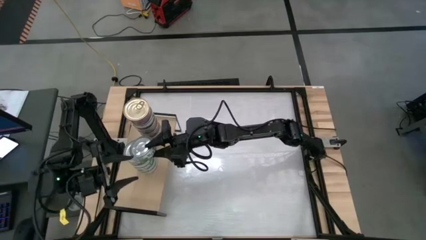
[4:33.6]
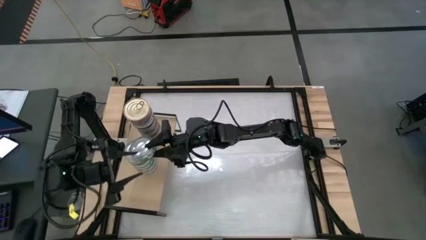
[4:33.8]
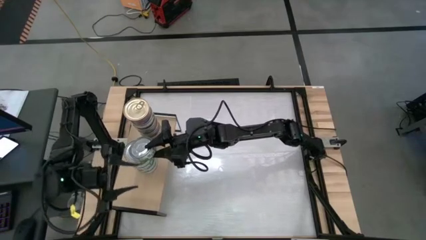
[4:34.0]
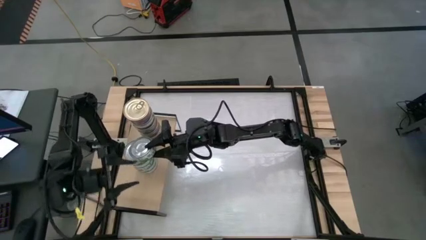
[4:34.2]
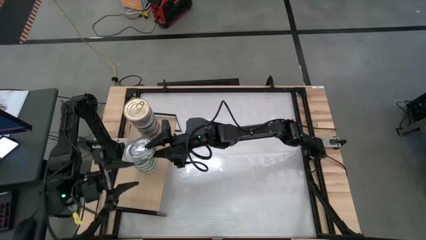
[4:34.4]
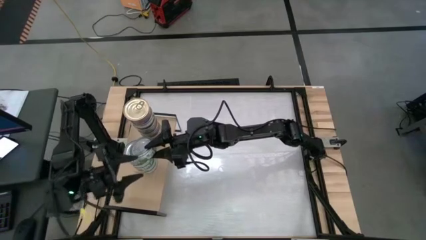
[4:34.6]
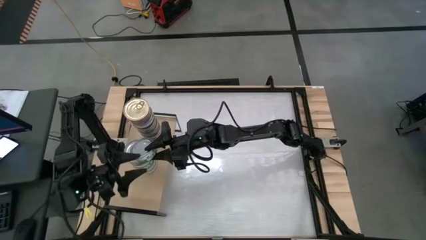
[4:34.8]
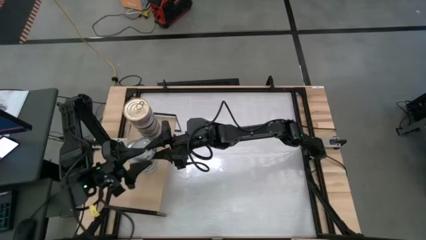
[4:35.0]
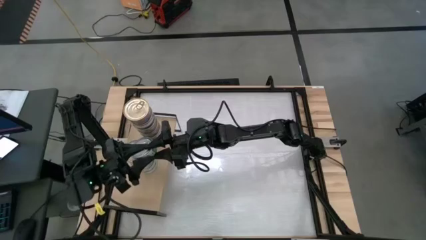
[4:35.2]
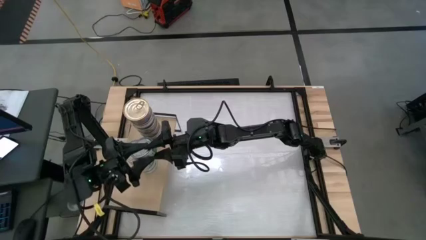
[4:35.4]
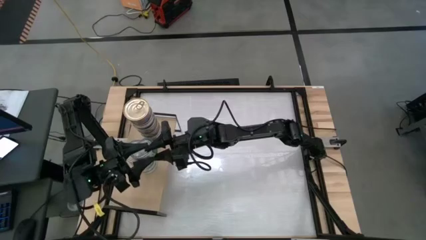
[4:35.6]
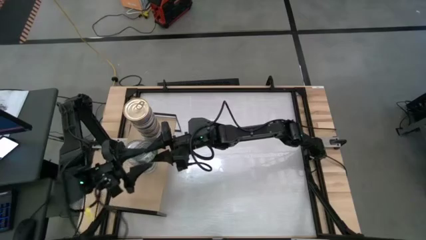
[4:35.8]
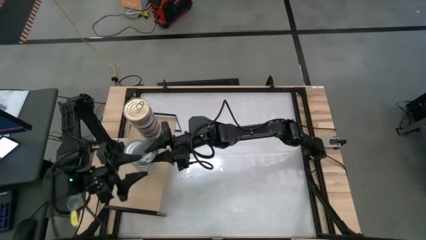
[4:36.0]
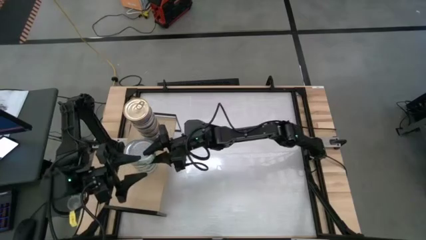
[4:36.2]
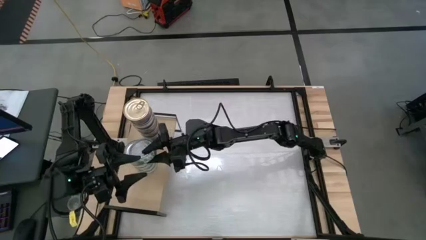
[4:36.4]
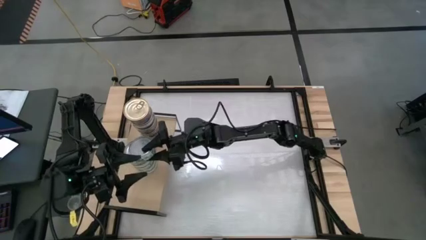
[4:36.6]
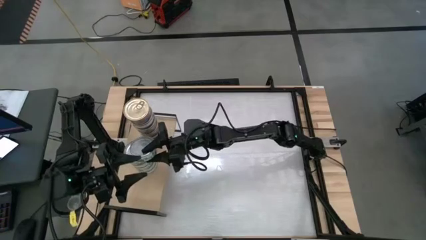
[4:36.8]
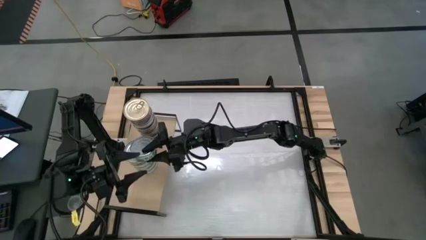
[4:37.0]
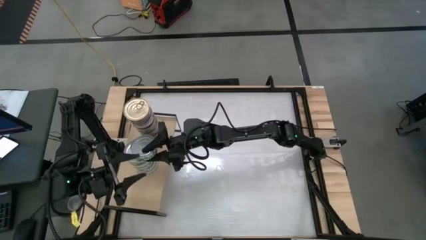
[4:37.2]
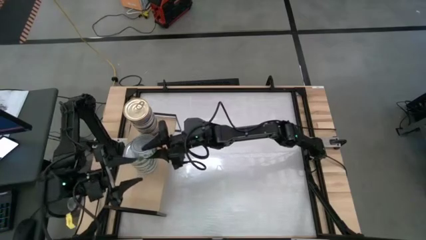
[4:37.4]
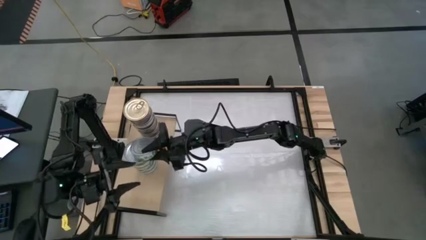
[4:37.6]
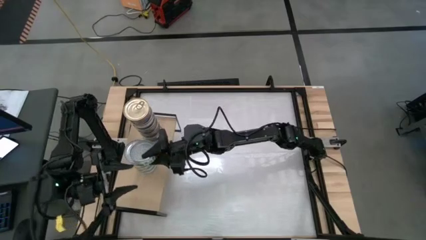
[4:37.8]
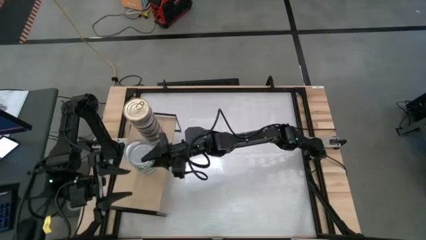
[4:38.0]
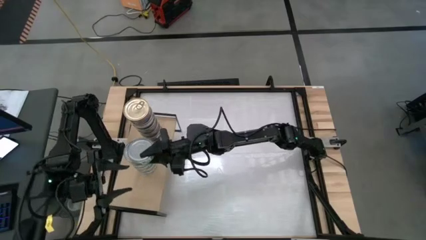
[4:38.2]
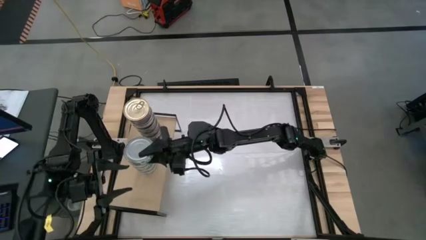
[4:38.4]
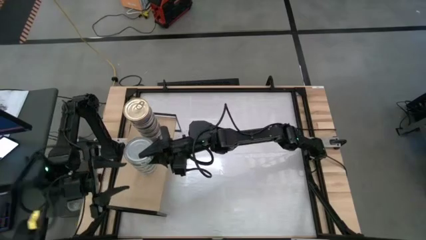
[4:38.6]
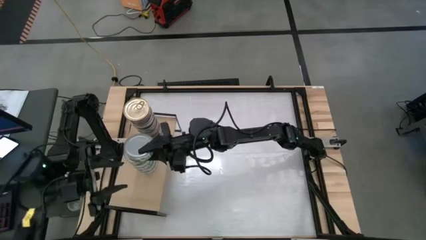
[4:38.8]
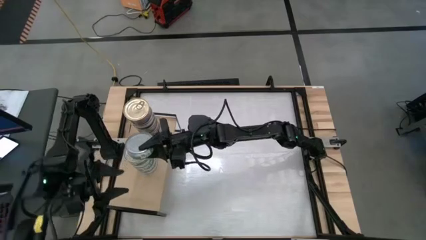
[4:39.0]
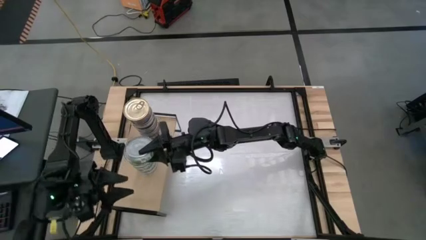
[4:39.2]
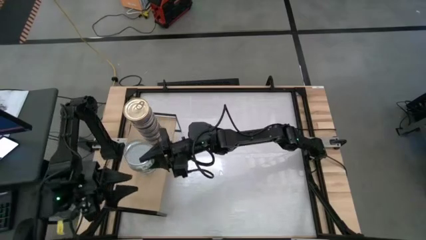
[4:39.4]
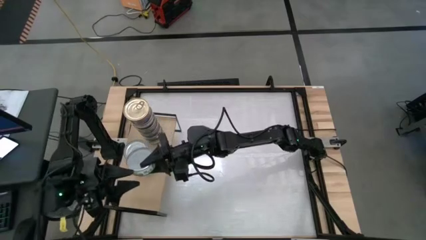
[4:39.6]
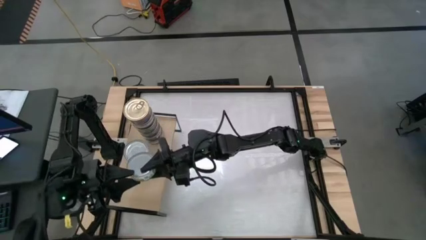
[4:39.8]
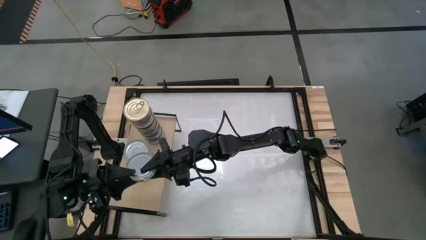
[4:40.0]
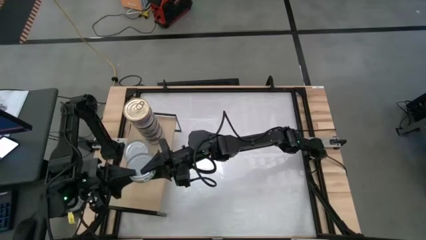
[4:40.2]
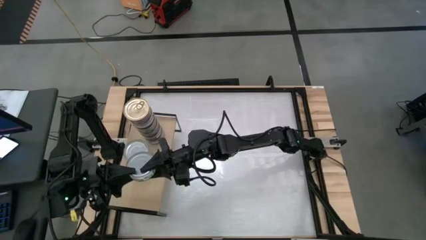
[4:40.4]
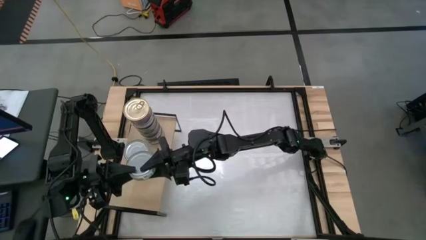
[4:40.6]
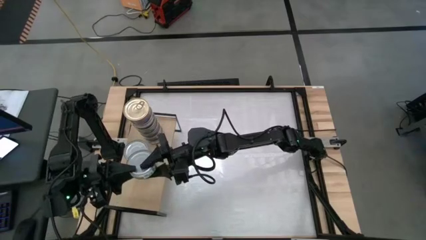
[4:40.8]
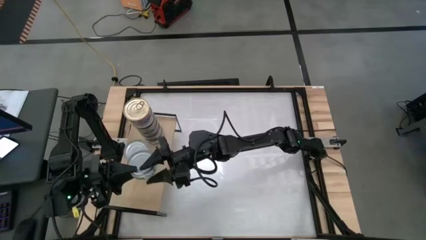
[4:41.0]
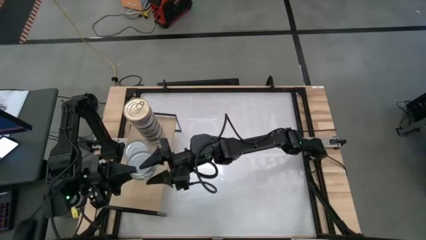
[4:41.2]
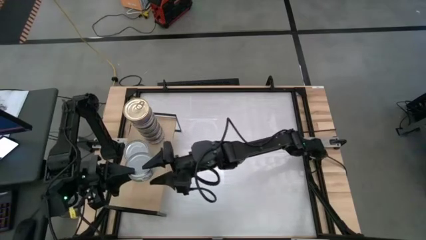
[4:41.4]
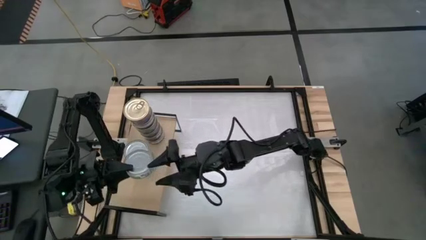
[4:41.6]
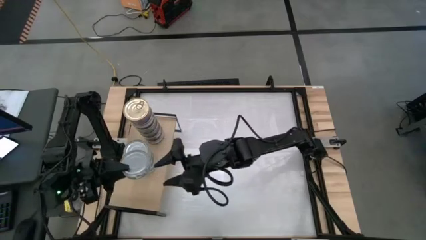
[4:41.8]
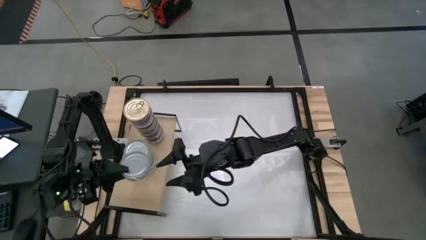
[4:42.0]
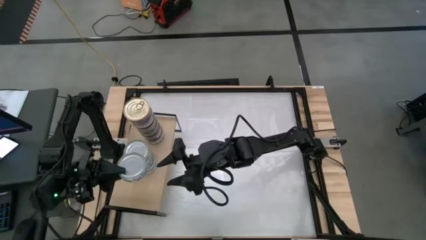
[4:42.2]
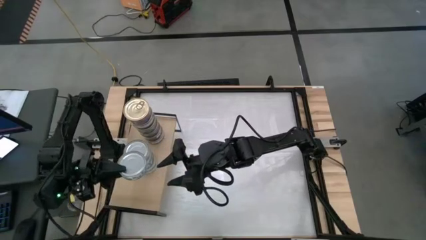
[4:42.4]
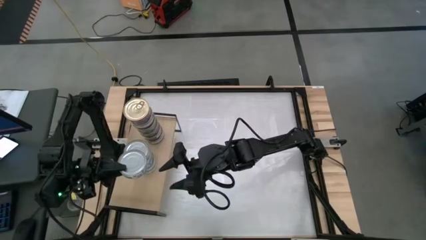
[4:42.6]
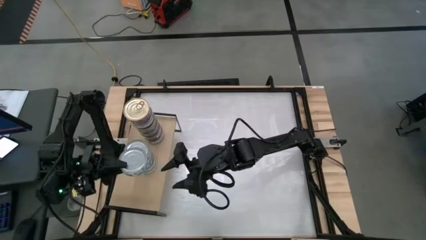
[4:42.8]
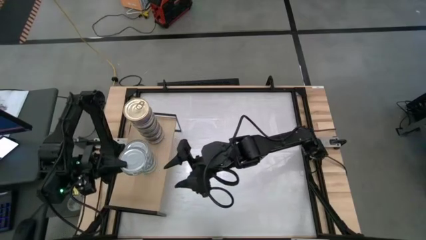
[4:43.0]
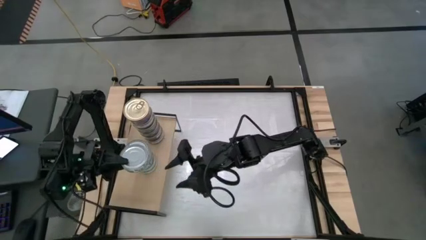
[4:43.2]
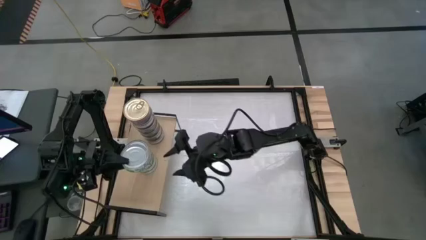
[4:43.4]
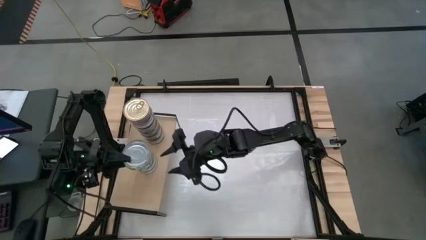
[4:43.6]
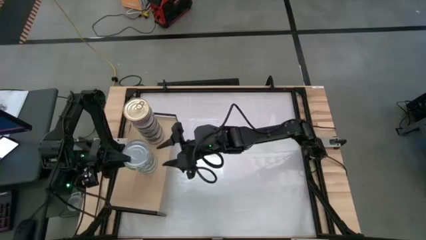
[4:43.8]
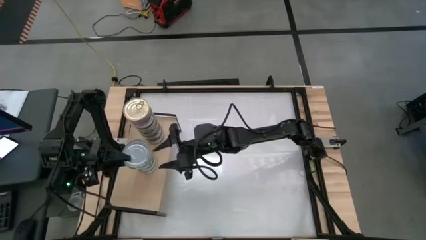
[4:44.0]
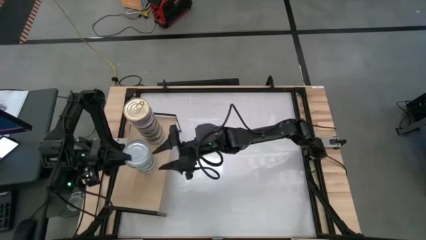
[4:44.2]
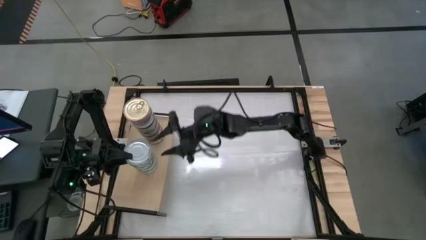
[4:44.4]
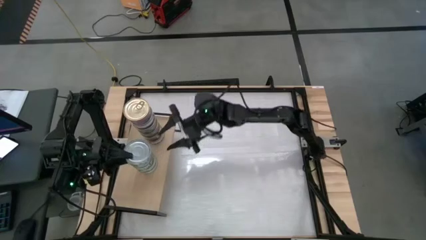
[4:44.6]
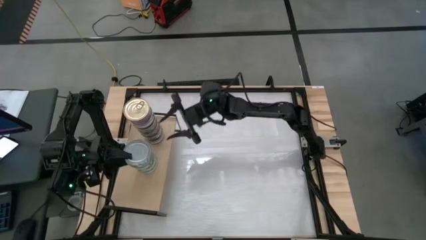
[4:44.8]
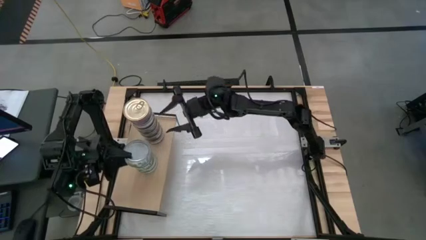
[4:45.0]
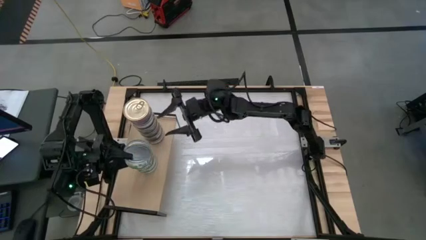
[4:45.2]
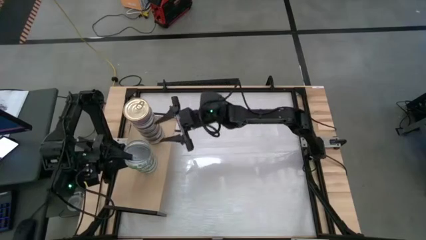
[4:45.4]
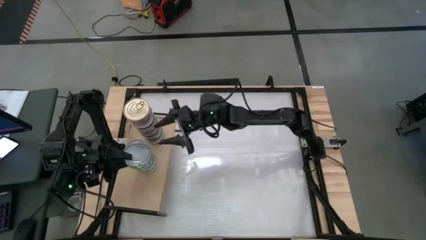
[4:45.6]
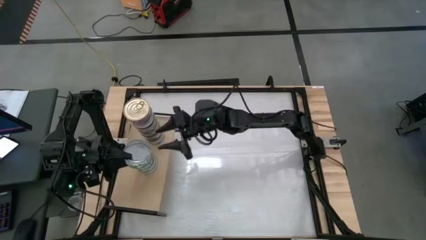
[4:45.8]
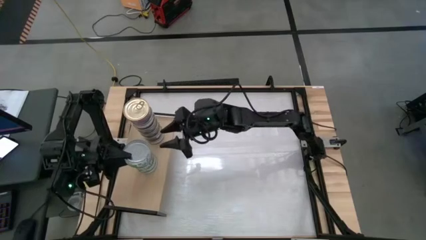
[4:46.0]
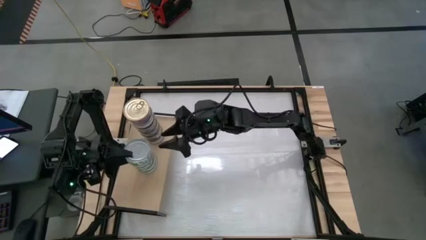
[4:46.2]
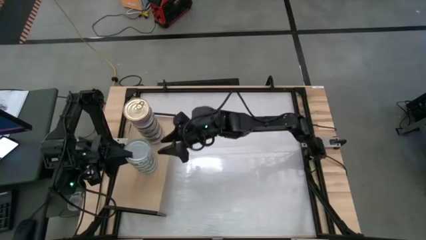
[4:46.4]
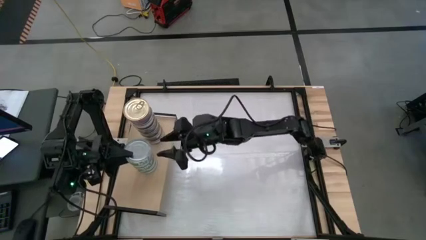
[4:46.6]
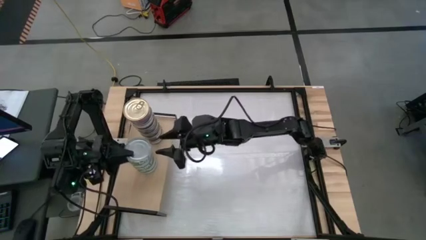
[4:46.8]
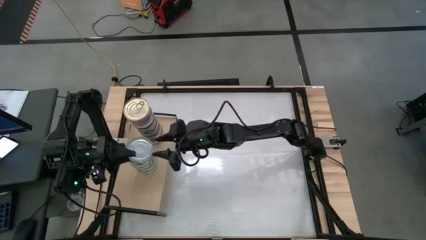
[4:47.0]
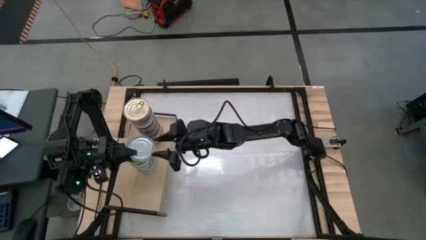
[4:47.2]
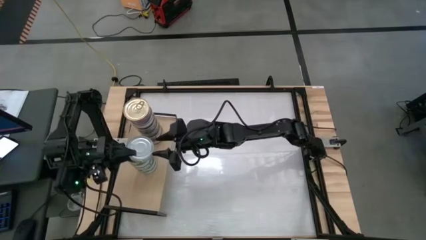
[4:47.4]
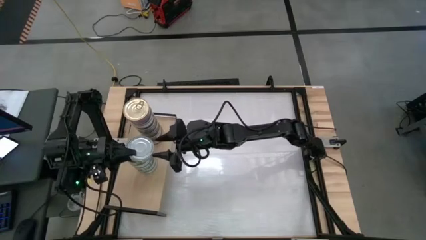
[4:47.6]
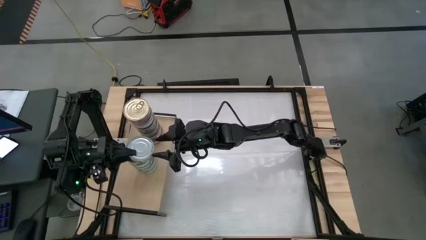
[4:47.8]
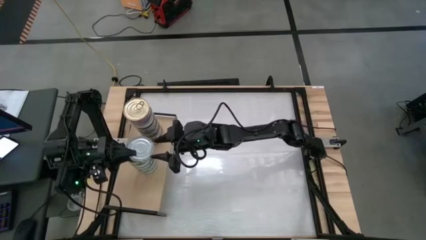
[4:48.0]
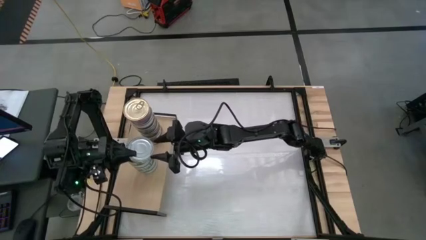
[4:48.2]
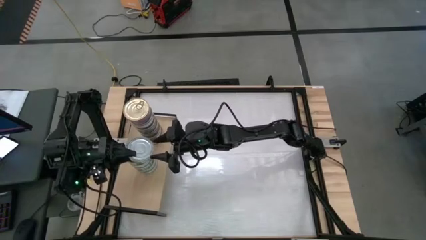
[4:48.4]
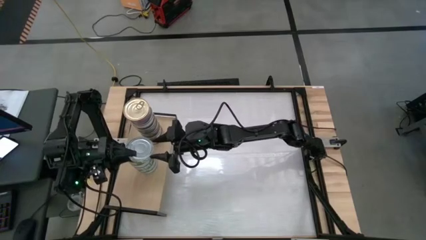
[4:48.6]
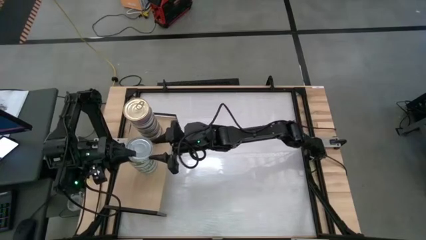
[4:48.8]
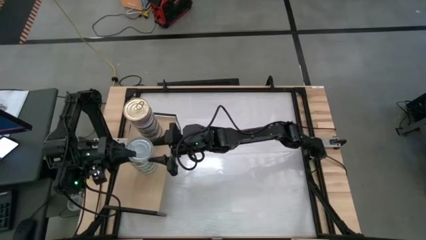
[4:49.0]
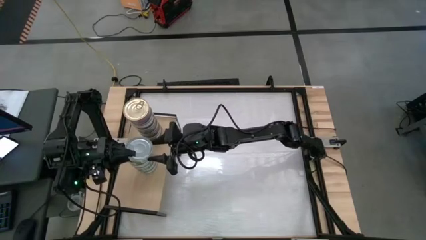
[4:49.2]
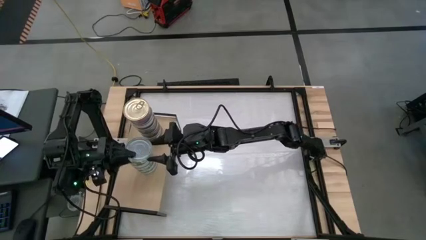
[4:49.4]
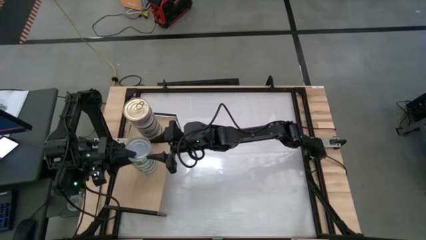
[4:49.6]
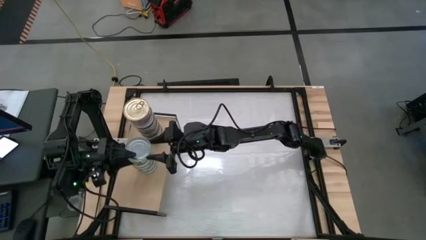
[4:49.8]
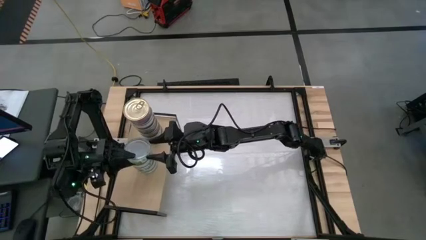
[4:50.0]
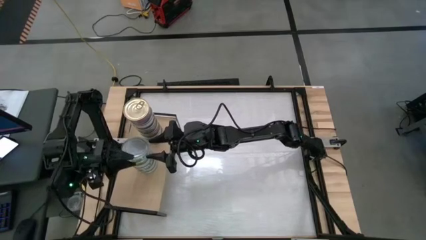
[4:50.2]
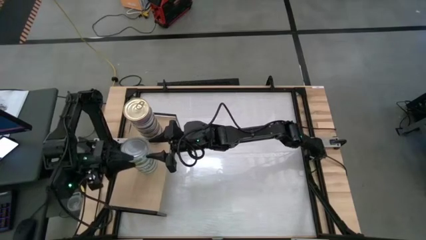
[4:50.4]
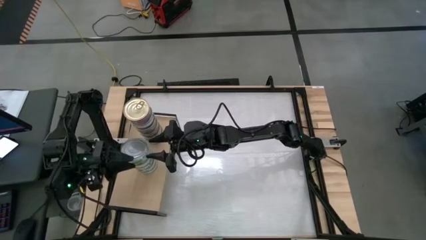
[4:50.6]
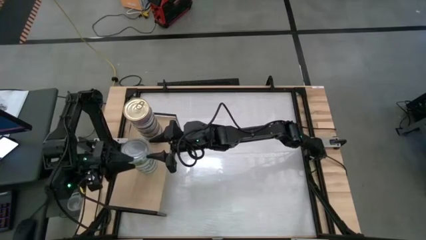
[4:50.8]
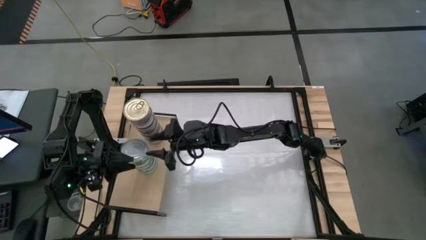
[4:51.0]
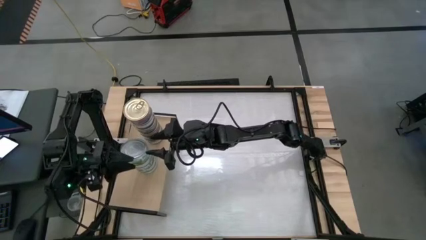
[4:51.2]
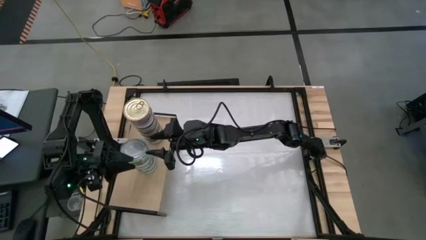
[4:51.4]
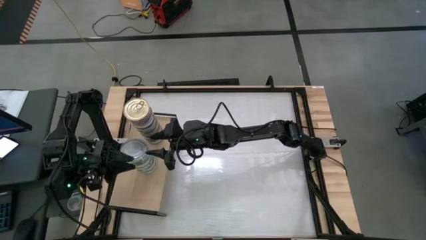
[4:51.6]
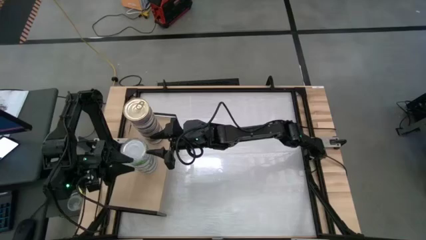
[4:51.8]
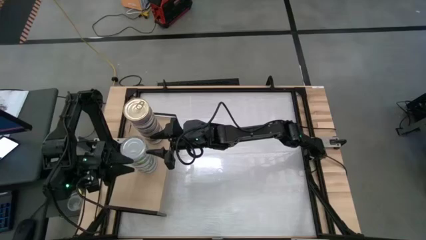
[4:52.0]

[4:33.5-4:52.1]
Task: Stack canned seafood by type on shelf
Stack the green tuna can on top of the green tuna can on the shelf
